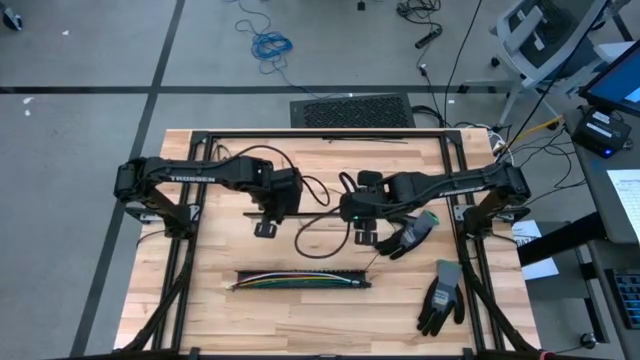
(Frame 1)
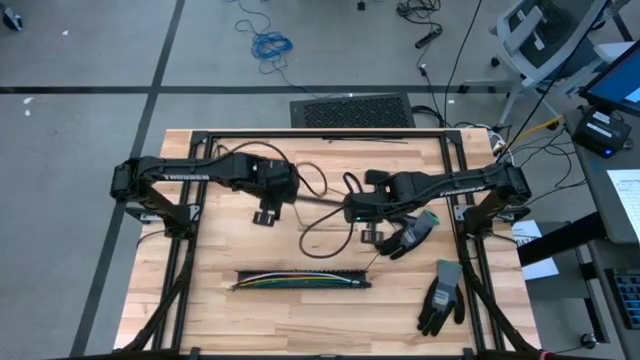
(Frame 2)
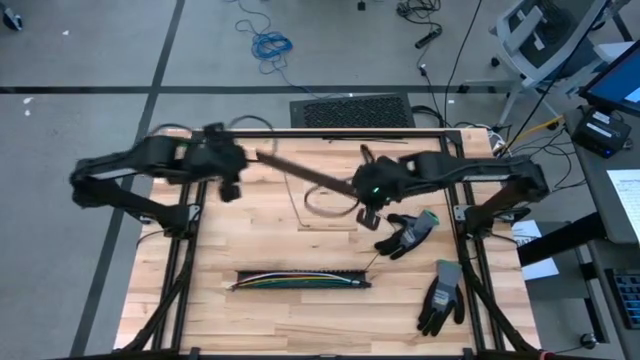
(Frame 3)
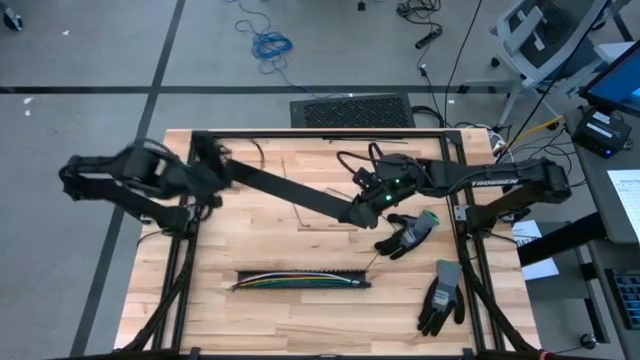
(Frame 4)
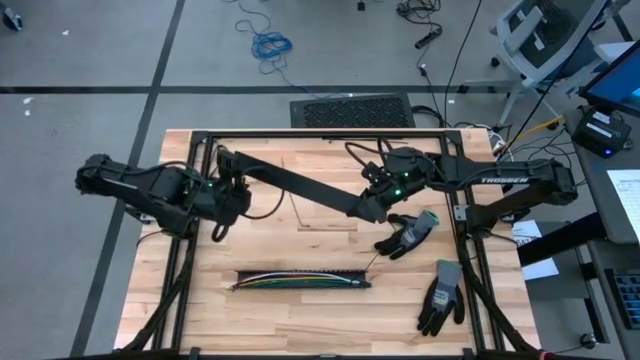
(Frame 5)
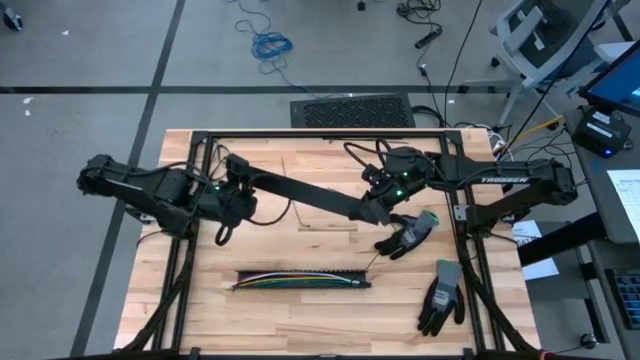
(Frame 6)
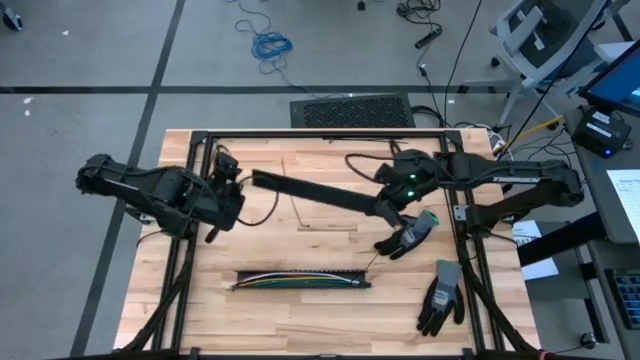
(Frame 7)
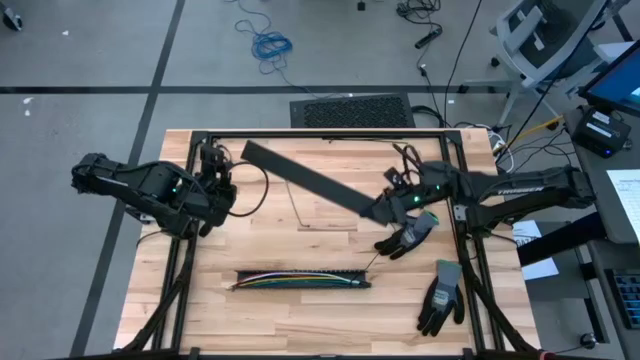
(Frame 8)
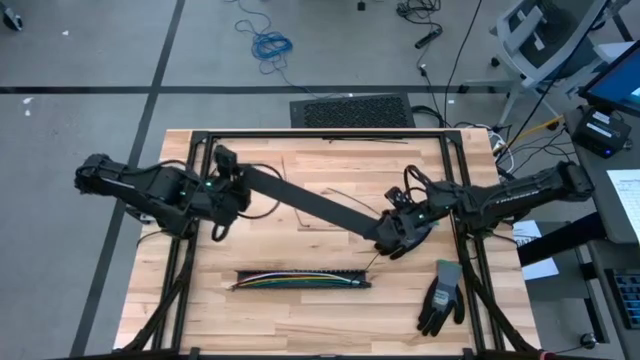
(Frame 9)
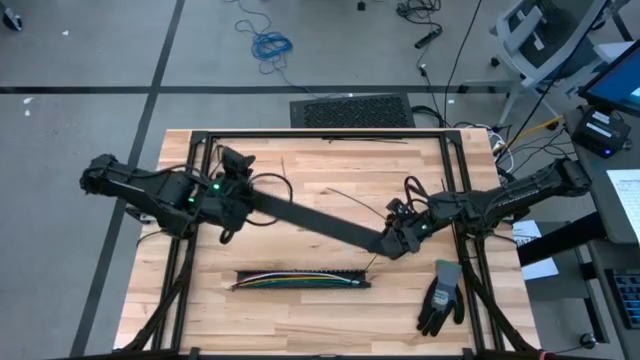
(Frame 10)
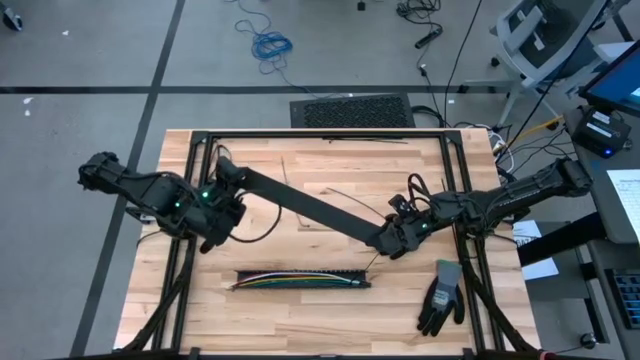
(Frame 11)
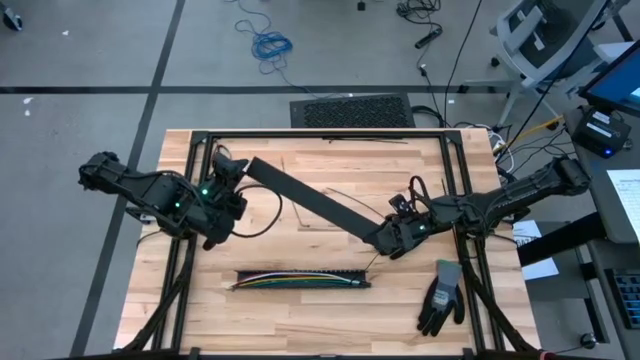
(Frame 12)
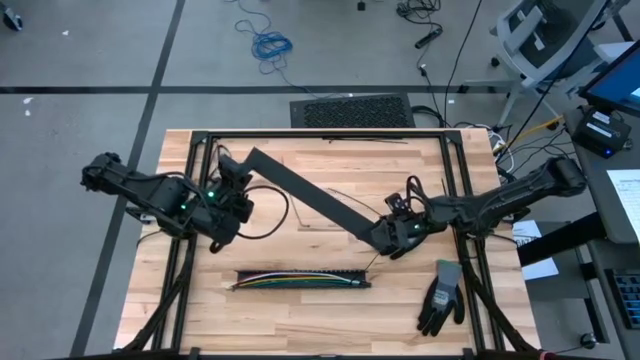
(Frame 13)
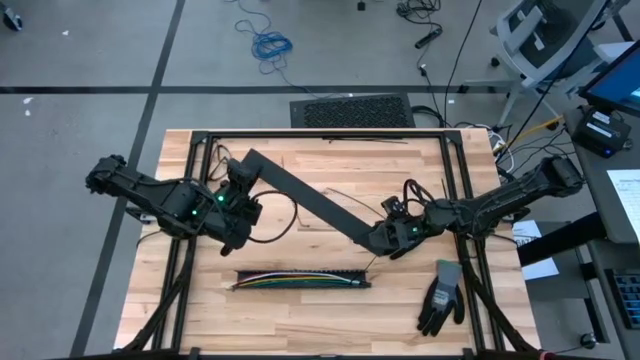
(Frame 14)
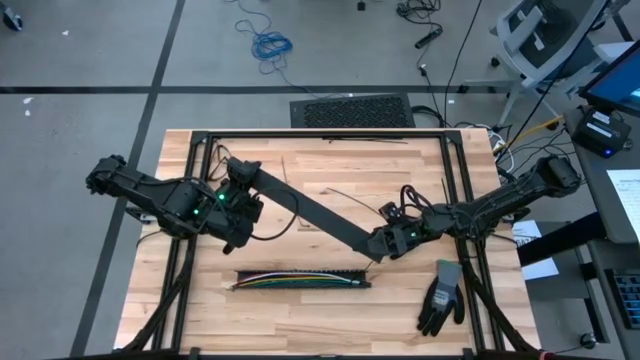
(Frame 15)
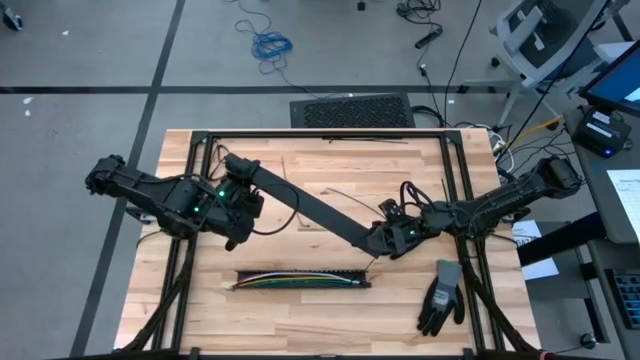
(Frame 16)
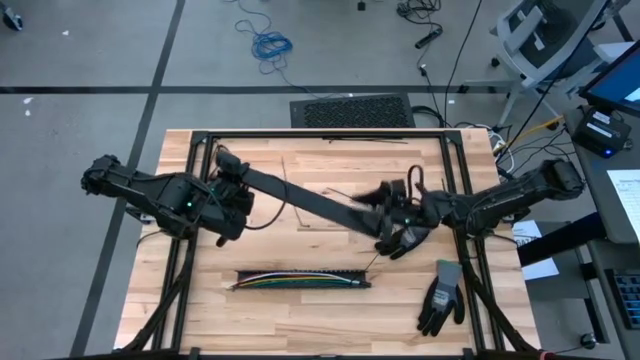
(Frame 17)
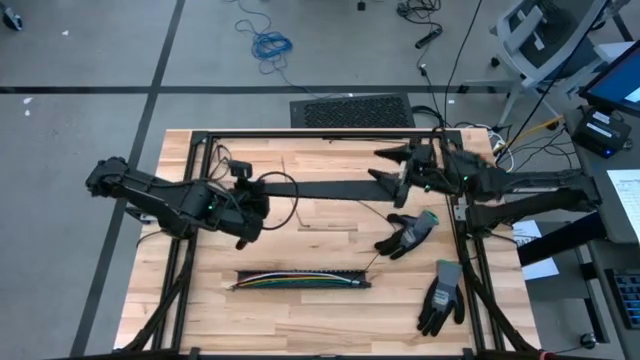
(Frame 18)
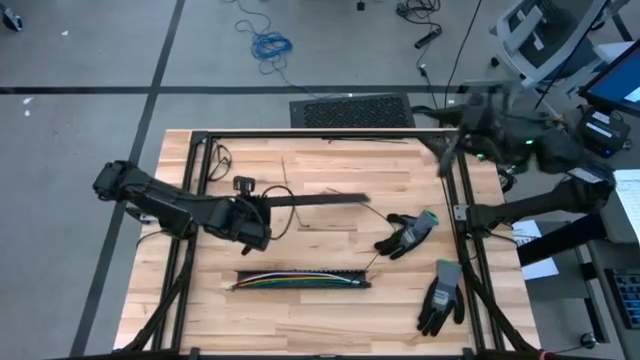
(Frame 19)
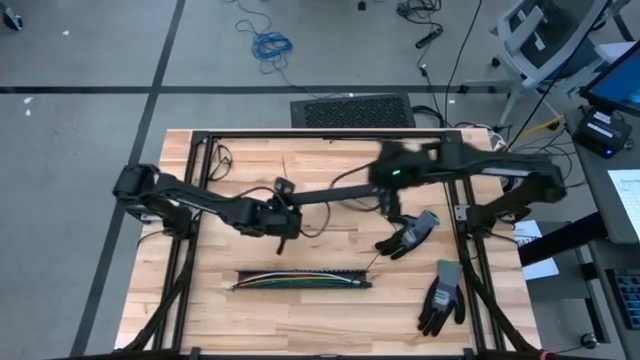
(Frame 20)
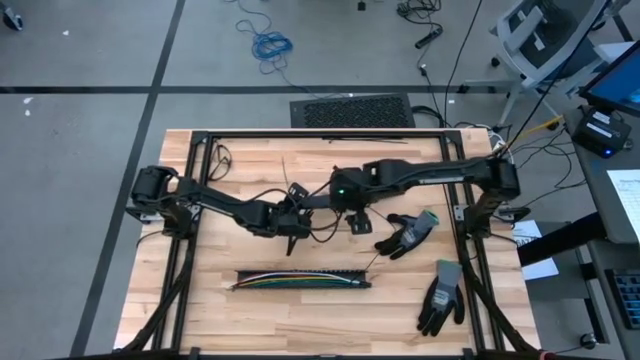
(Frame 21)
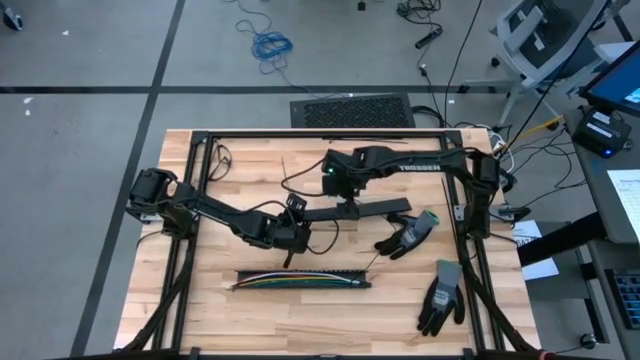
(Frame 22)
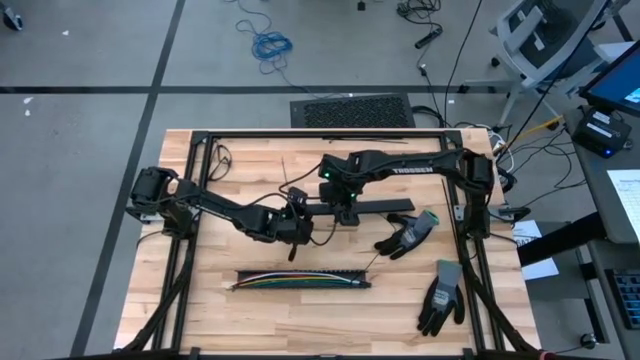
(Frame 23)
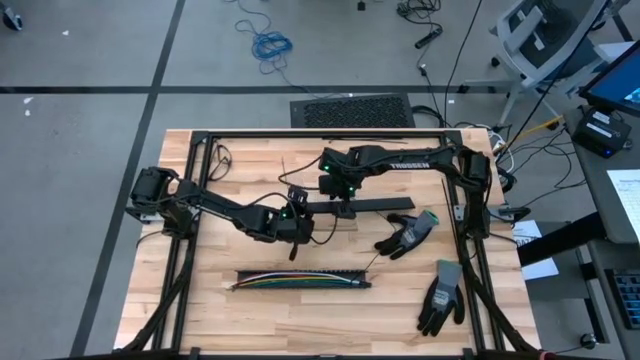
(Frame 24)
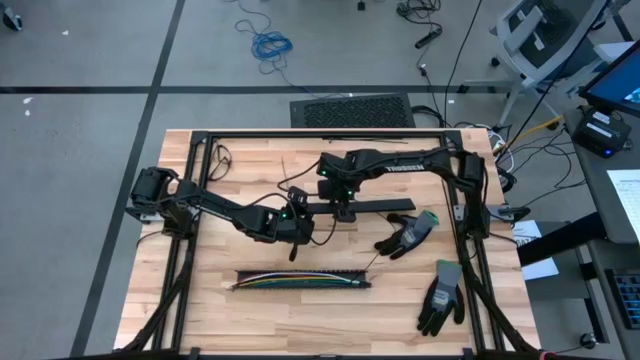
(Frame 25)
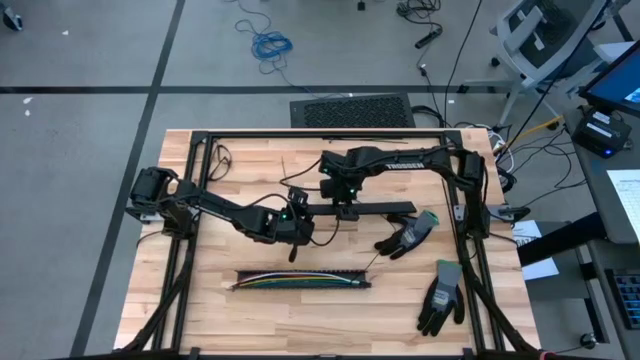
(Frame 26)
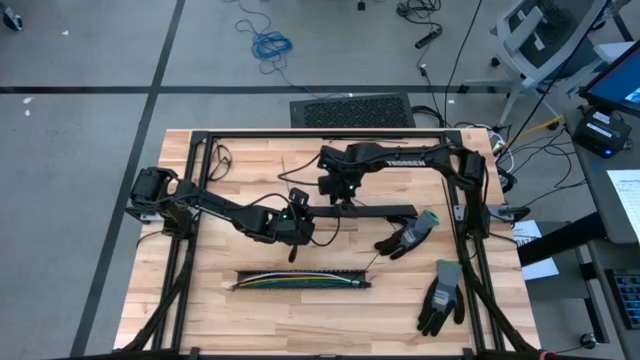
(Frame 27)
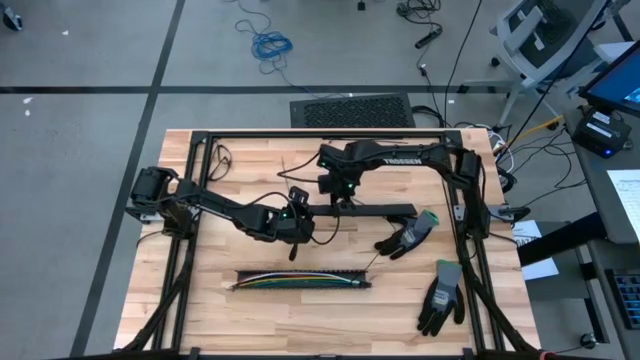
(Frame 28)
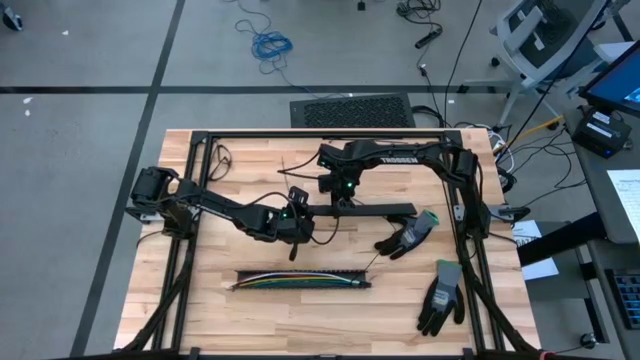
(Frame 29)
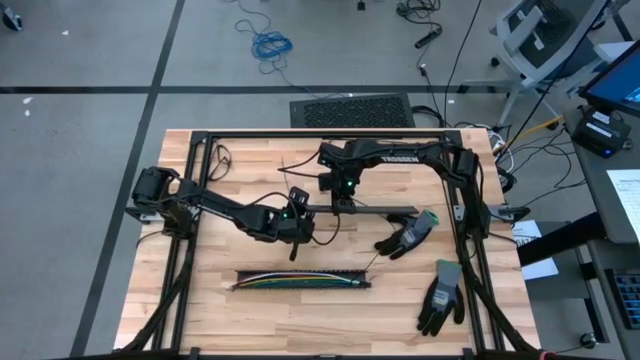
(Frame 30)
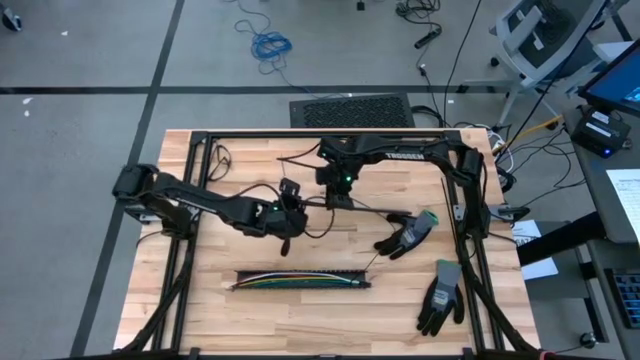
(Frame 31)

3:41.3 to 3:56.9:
Task: Ziptie cables
Close the black cable duct
